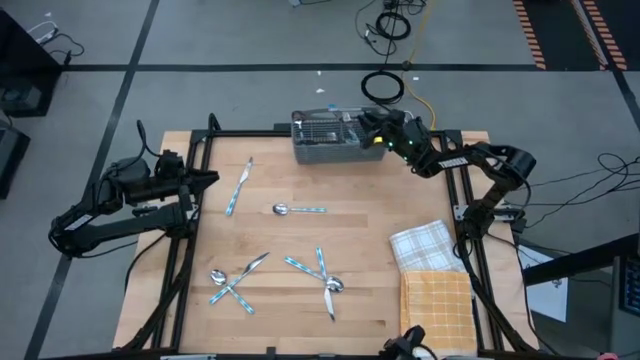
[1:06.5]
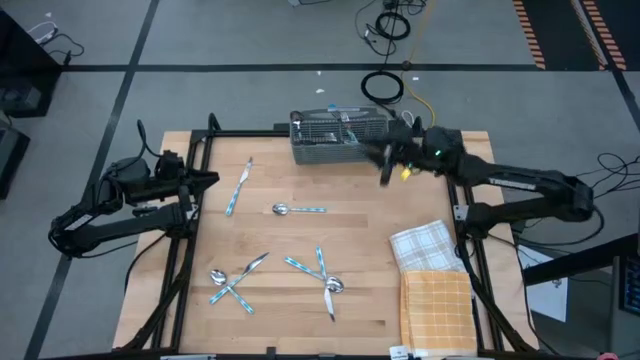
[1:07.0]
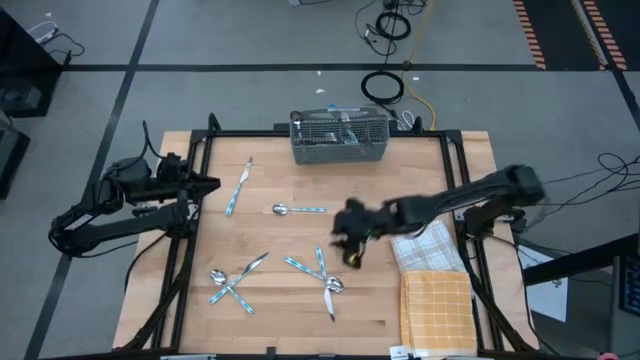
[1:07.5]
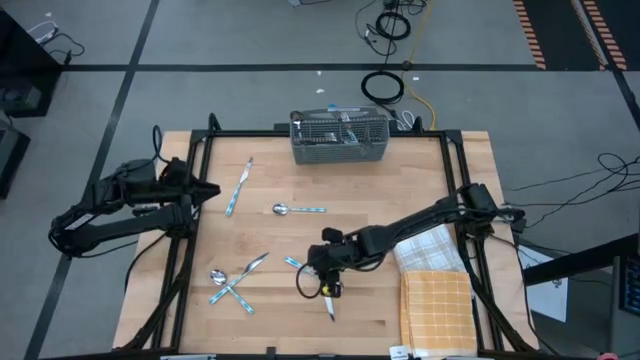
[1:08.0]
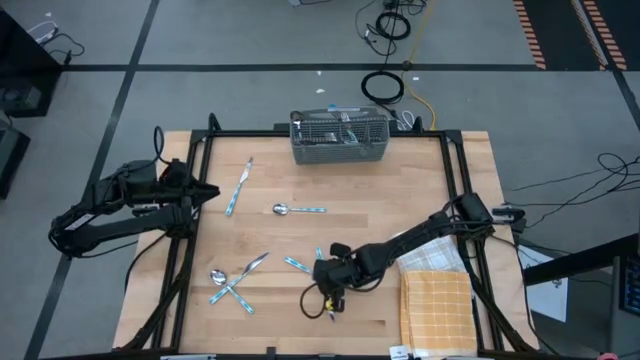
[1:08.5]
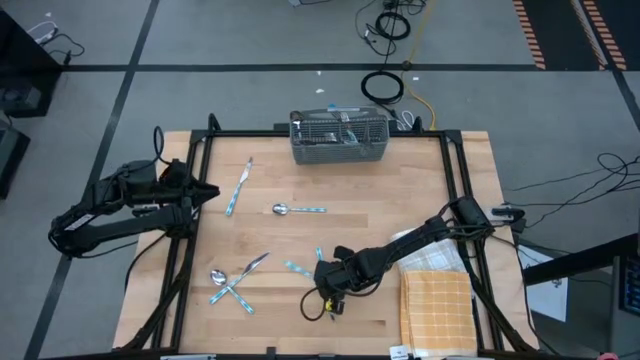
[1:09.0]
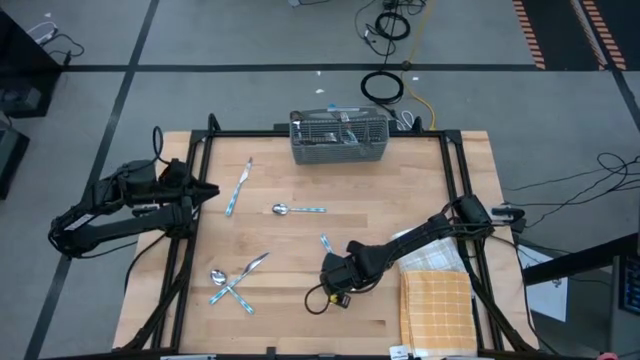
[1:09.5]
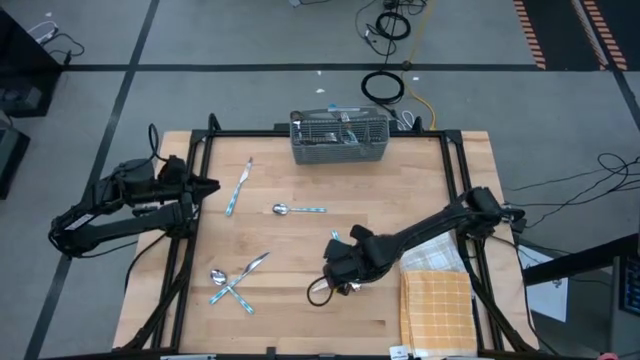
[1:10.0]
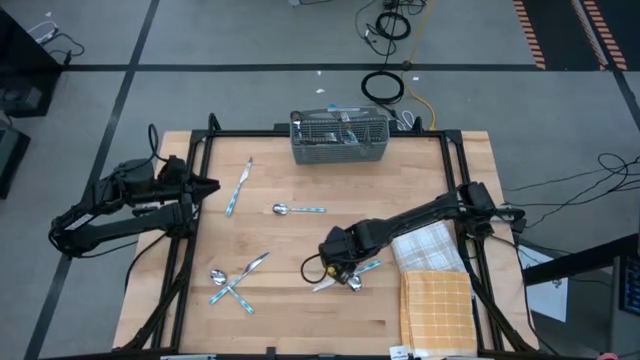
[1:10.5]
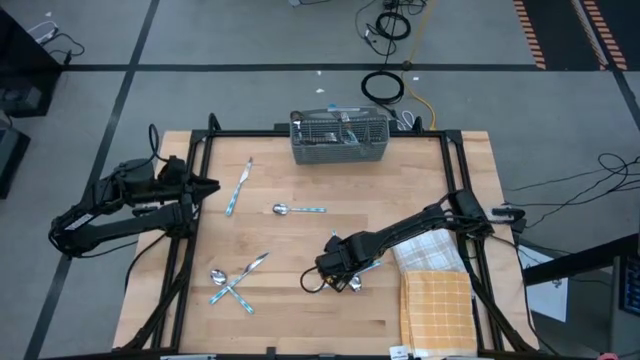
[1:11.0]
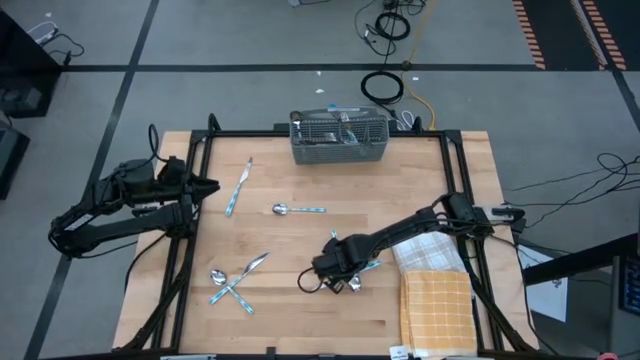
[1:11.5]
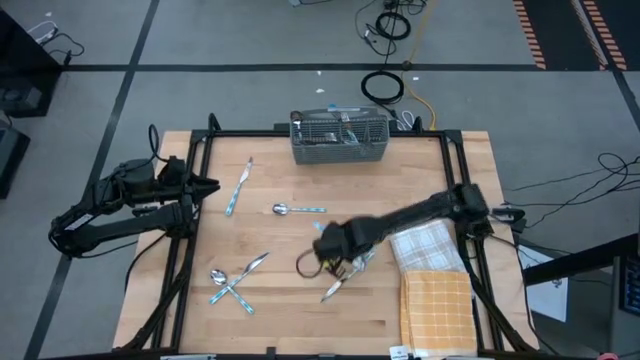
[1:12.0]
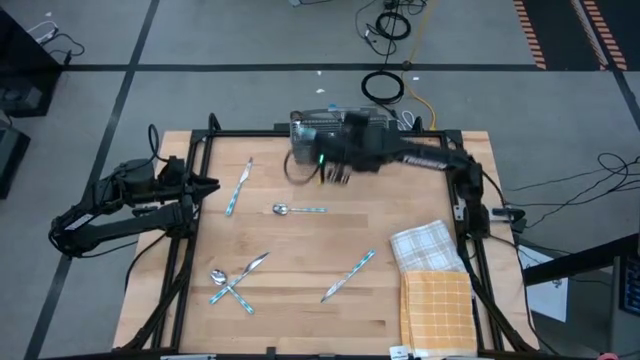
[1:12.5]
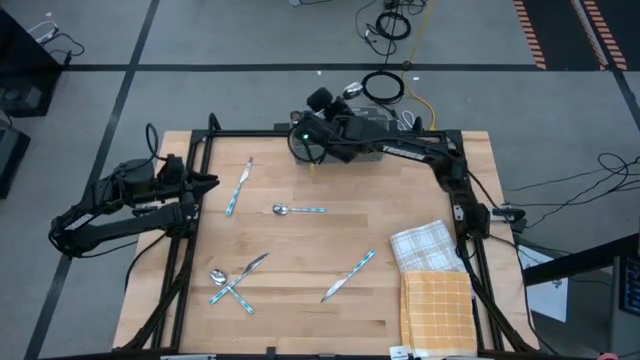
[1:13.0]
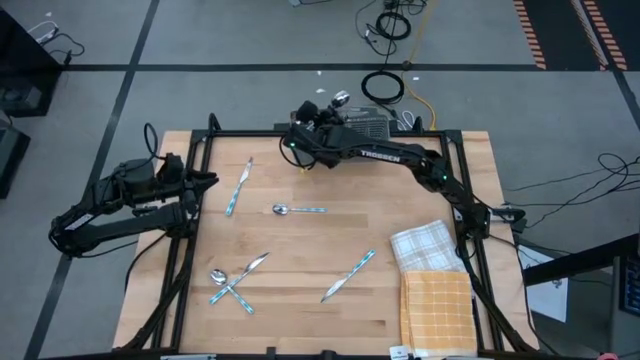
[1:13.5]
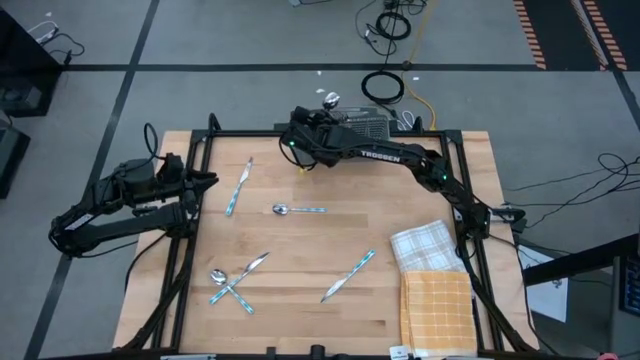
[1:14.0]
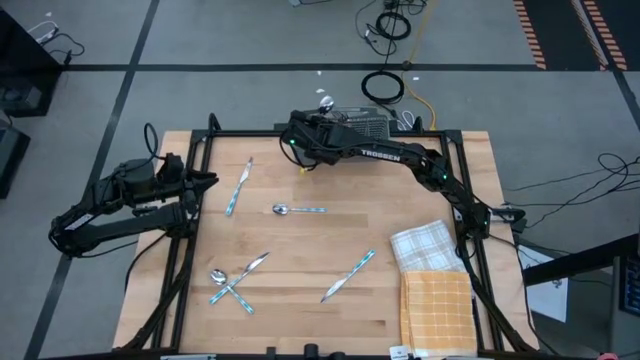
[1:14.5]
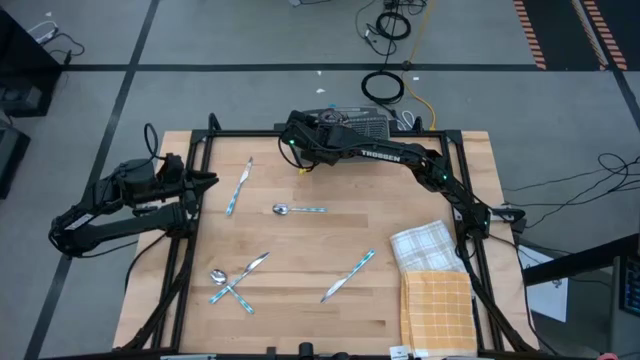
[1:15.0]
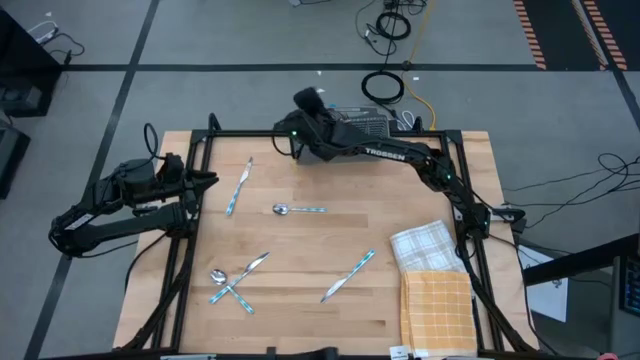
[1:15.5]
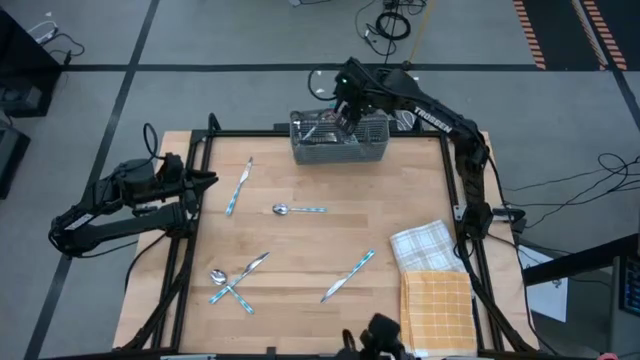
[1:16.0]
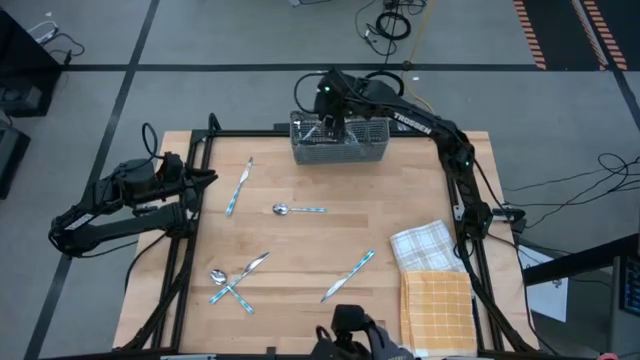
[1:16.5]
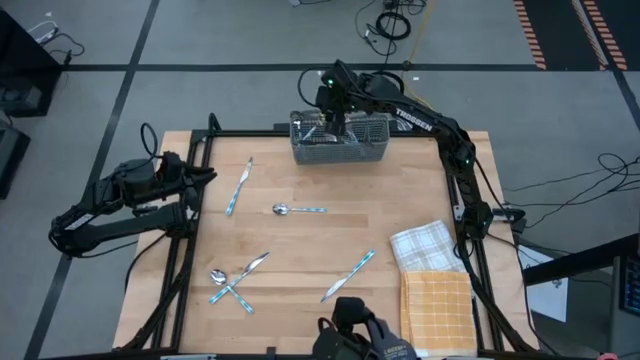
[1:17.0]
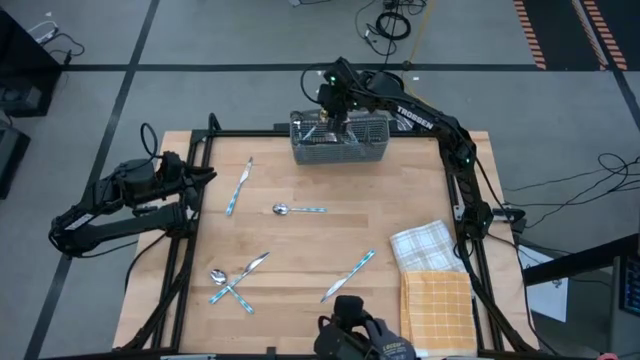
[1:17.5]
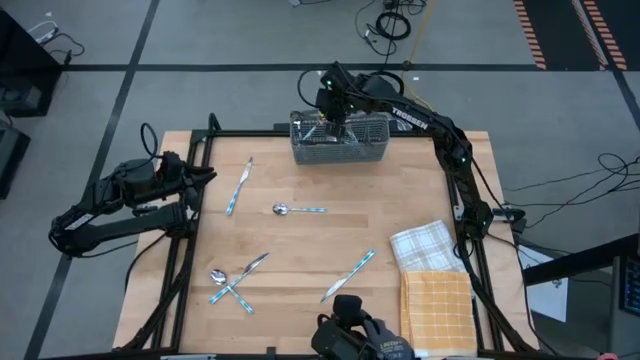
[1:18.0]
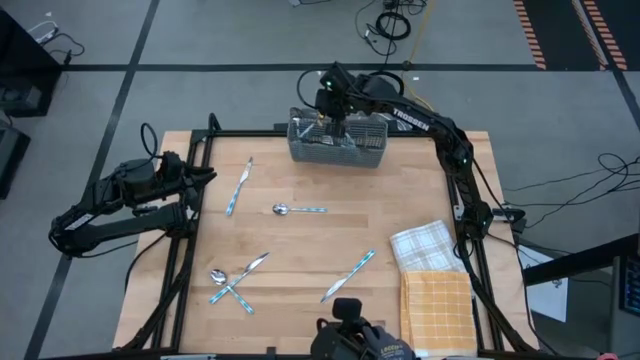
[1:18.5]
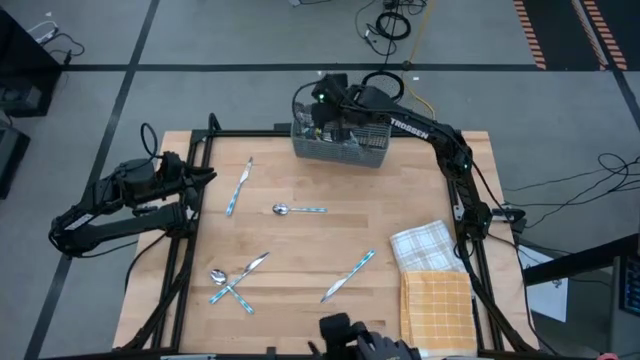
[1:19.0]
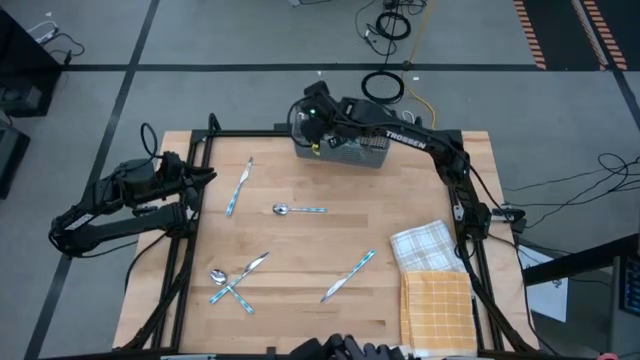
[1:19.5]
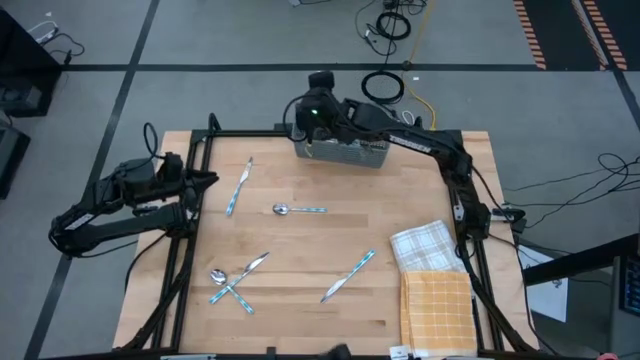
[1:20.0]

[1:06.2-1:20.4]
Task: Sort silverware
Put the bottom right blue spoon into the gray silverware basket

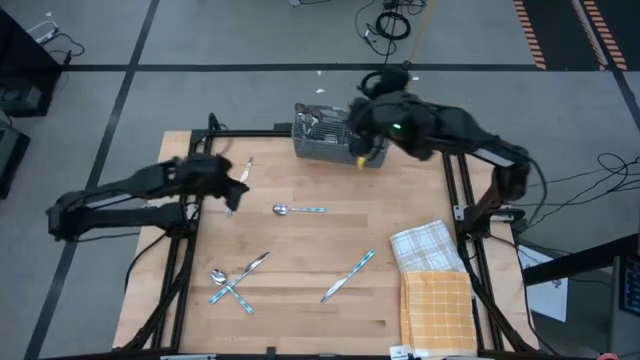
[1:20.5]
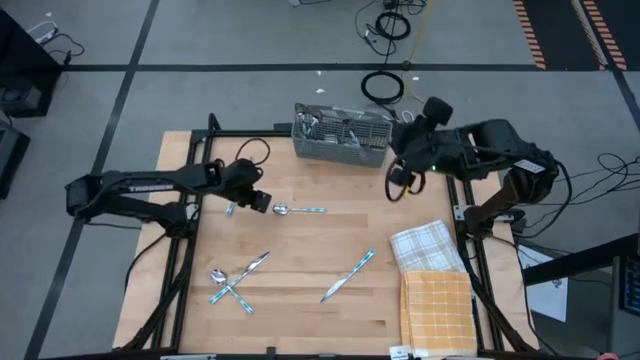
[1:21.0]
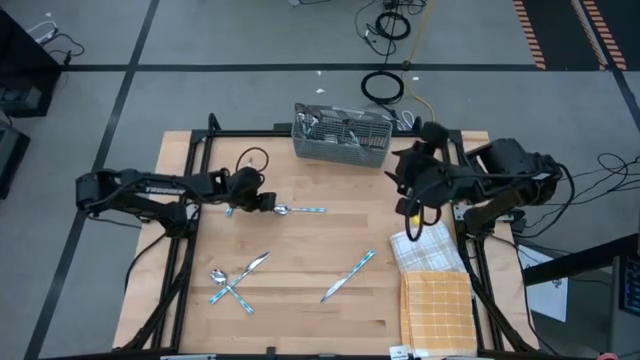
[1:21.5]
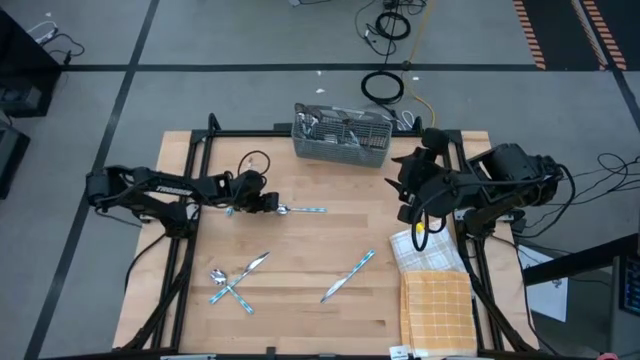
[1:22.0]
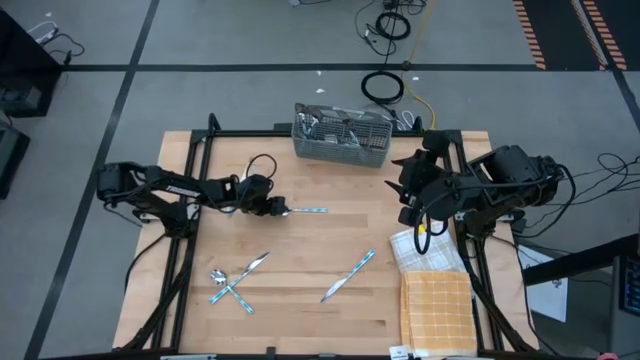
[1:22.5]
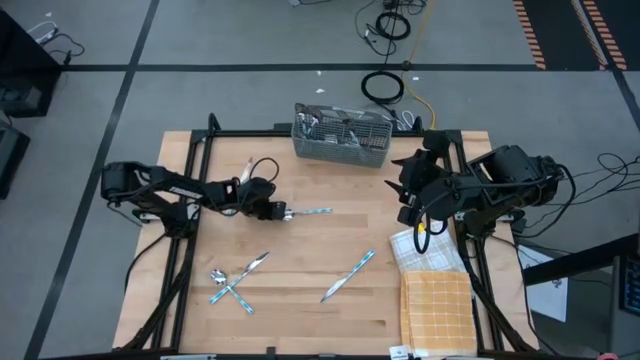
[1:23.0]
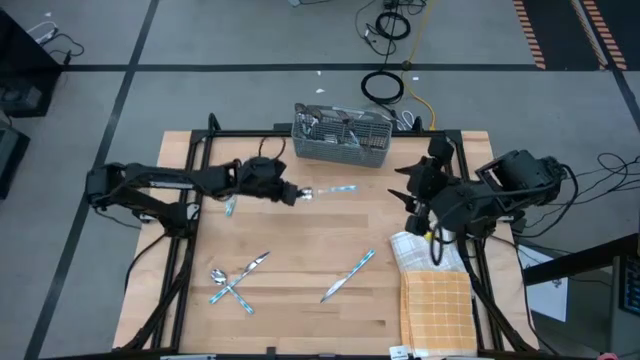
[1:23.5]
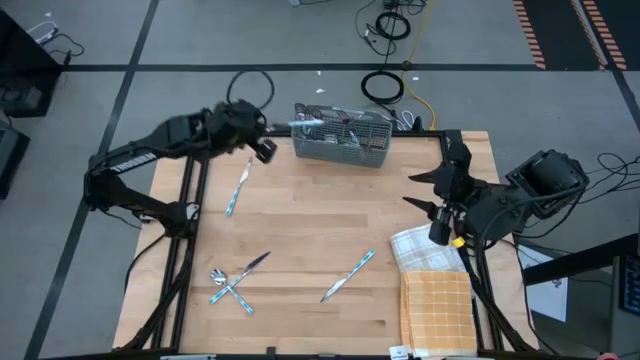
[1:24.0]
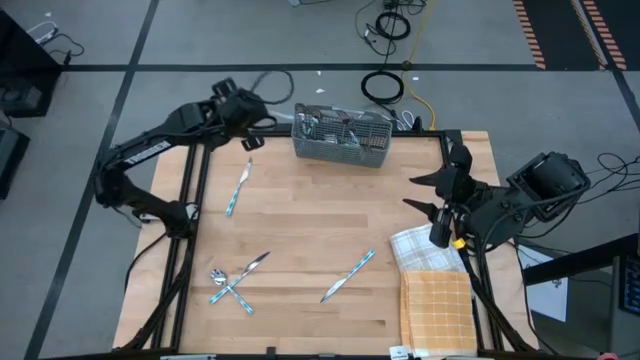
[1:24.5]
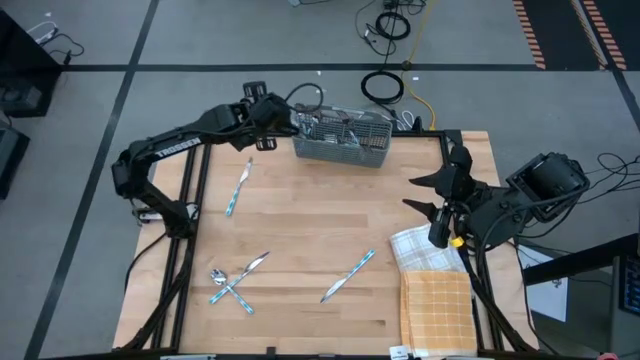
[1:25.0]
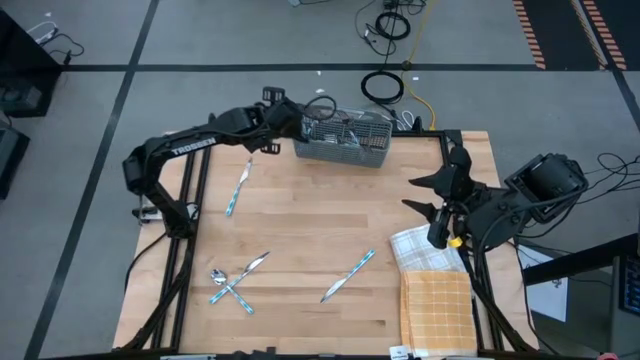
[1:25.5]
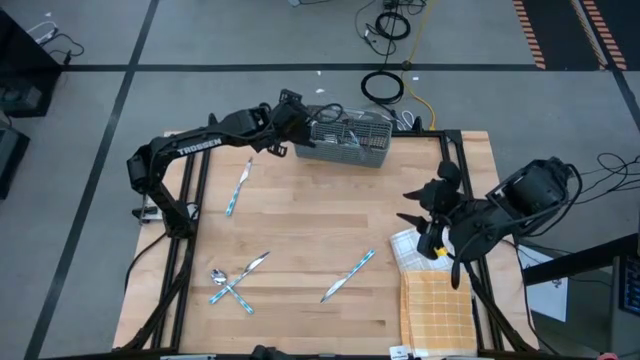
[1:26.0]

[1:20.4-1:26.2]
Put the top blue spoon into the gray silverware basket

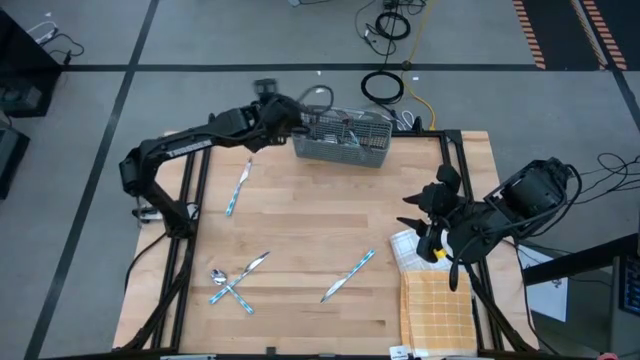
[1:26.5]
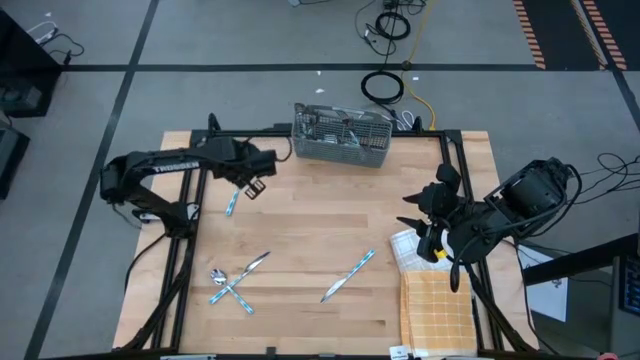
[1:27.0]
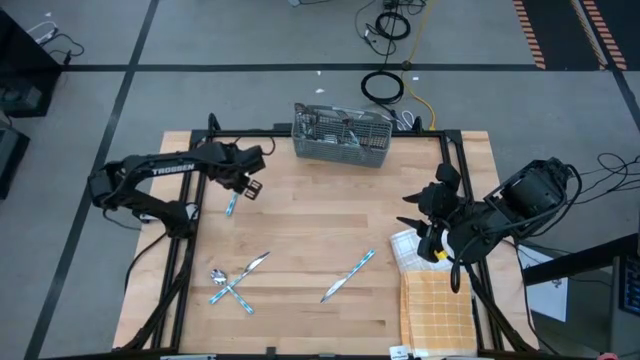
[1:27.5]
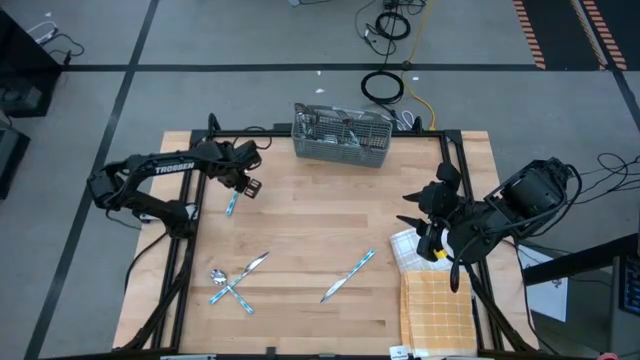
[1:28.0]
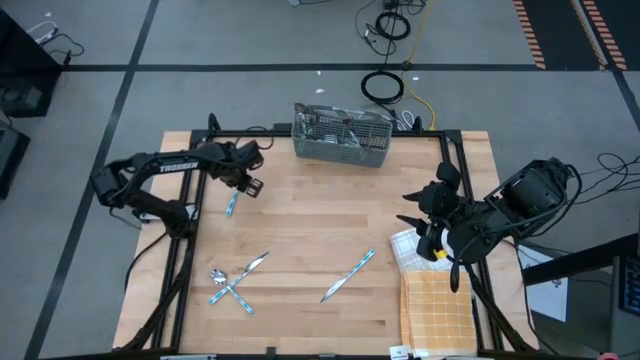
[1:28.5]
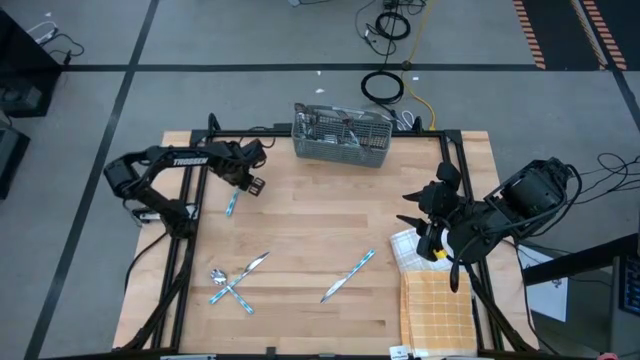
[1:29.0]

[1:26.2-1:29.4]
Put the top blue table knife into the gray silverware basket
